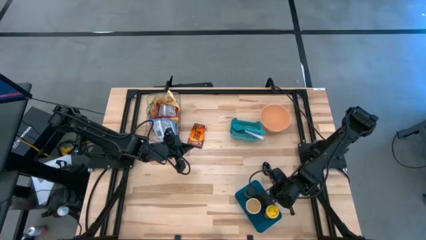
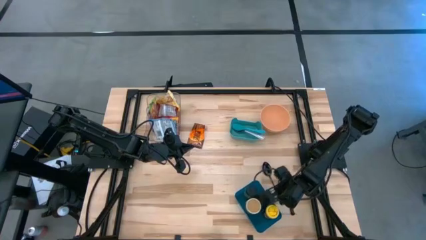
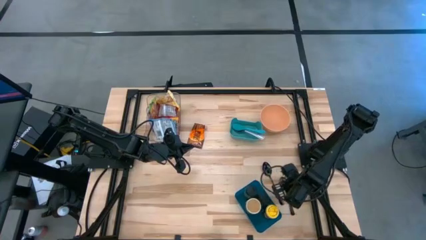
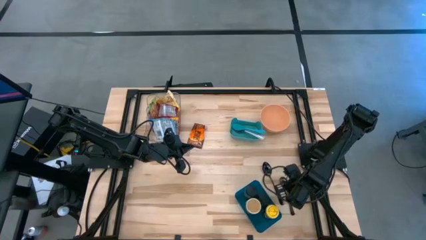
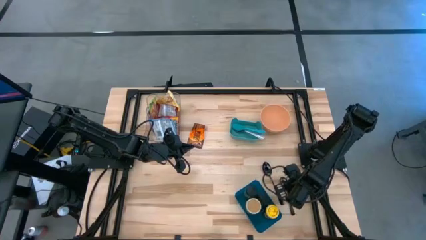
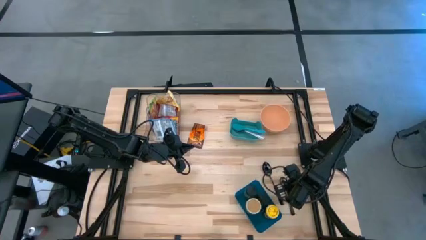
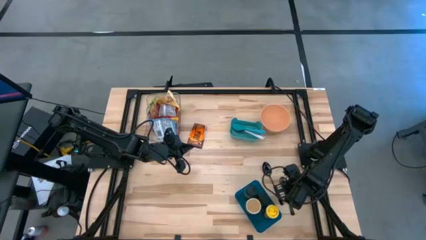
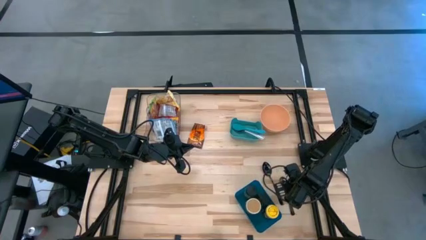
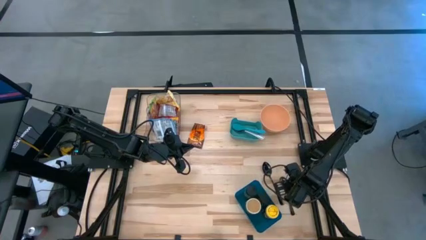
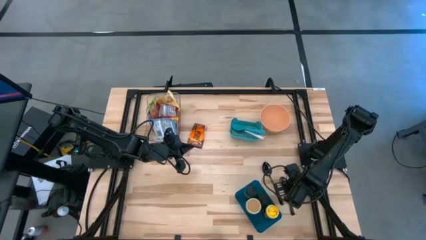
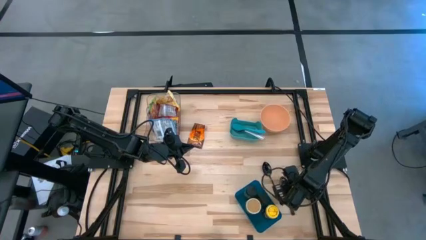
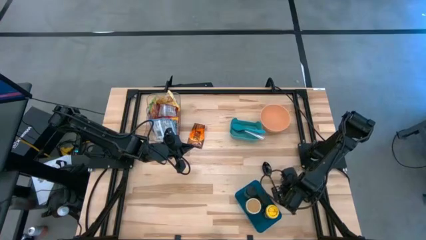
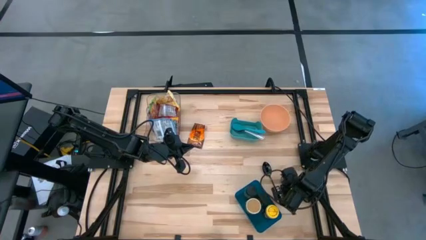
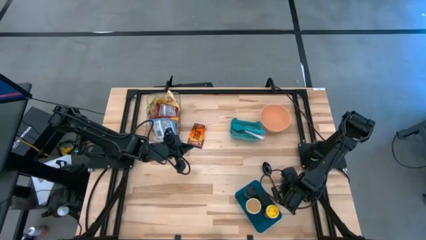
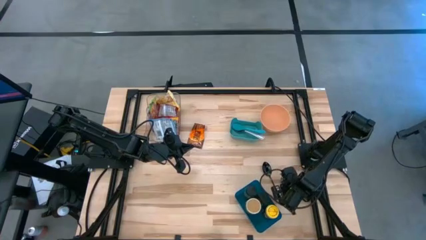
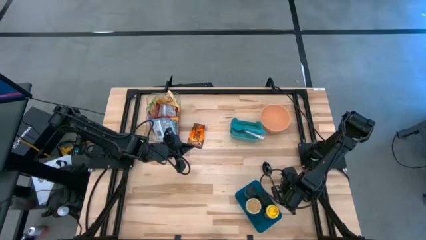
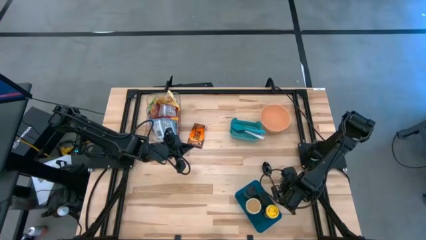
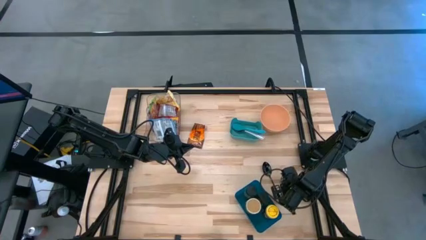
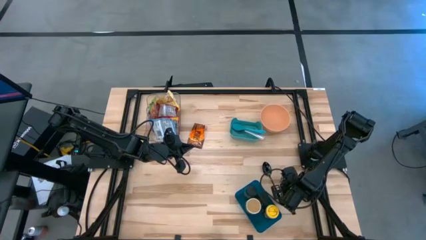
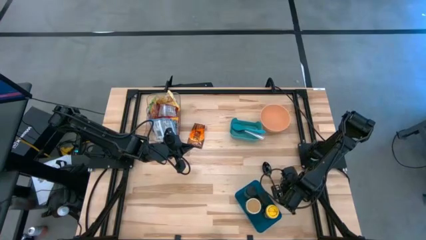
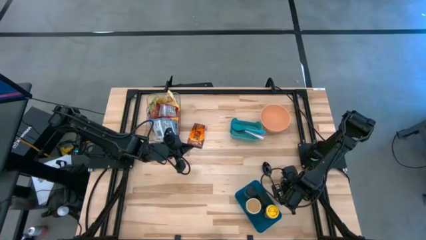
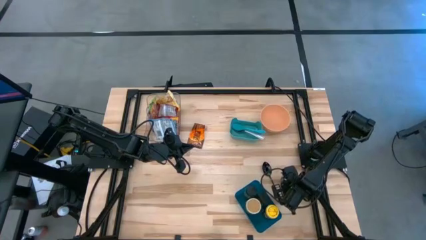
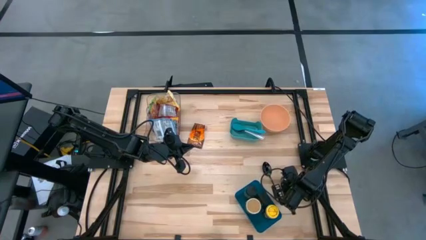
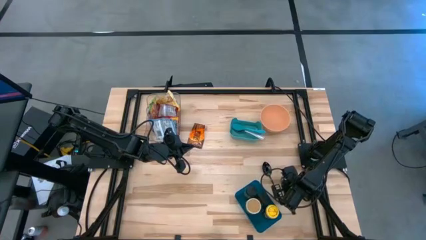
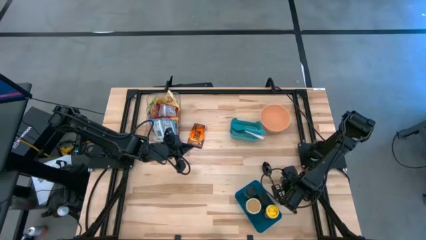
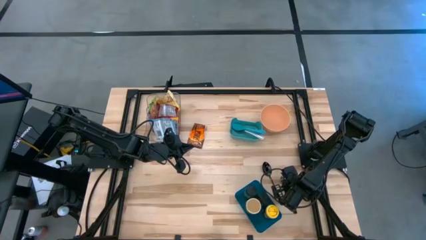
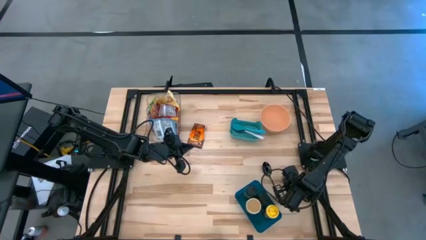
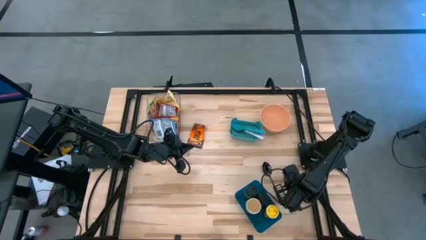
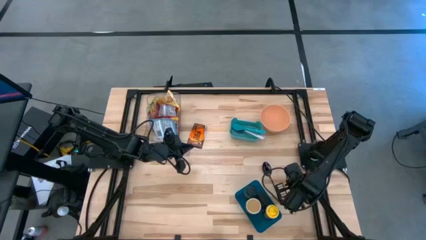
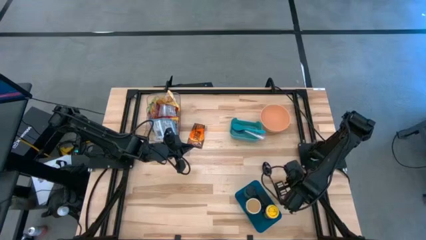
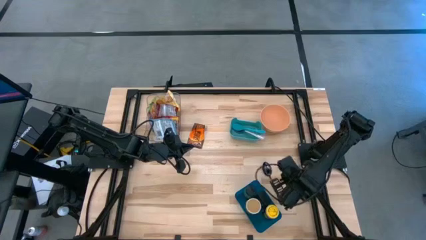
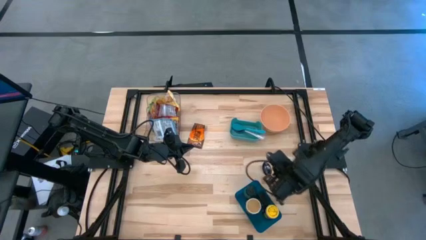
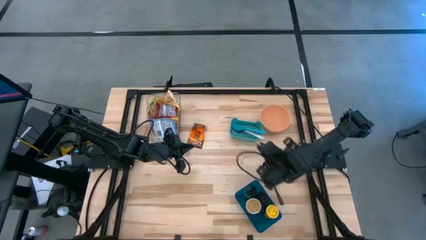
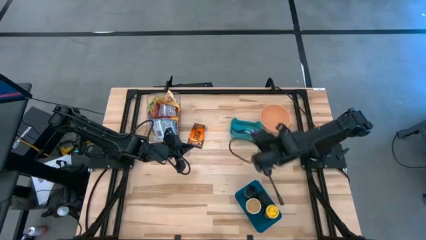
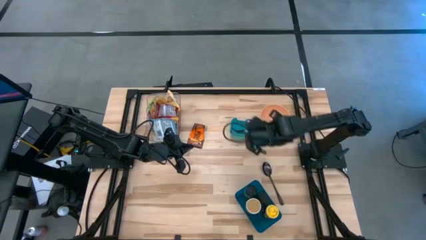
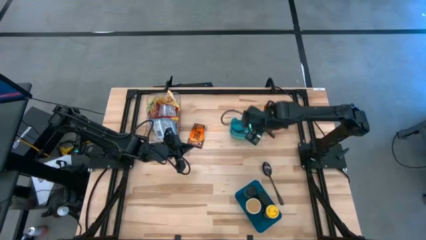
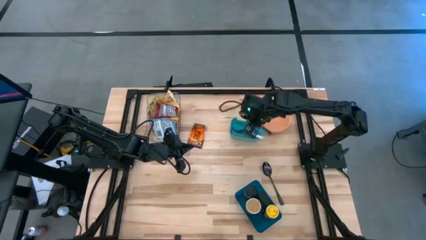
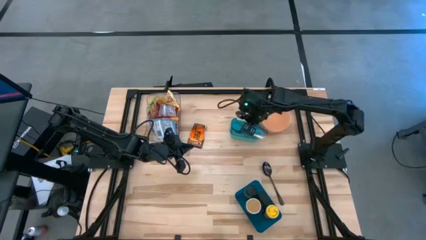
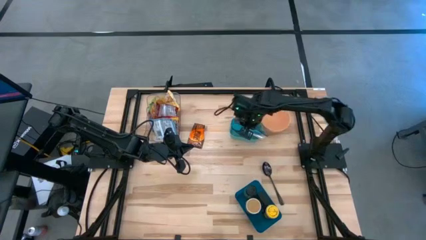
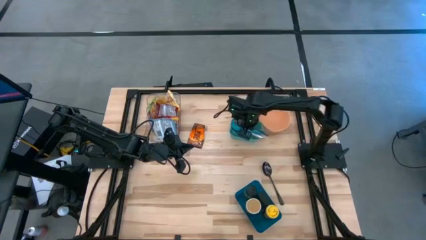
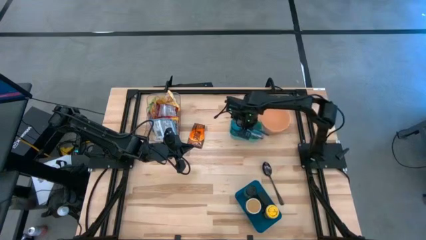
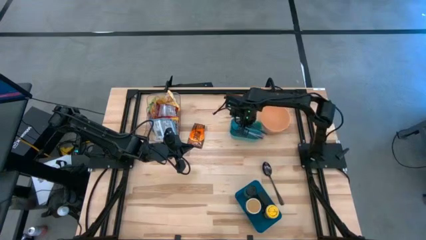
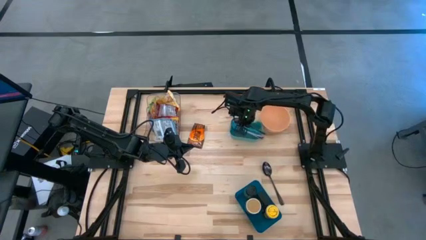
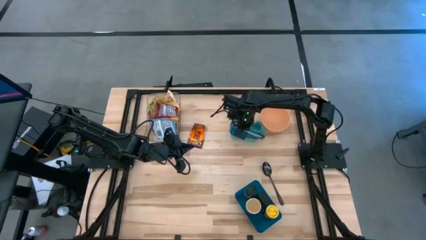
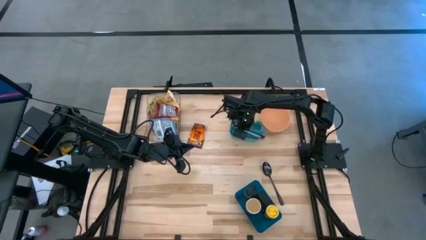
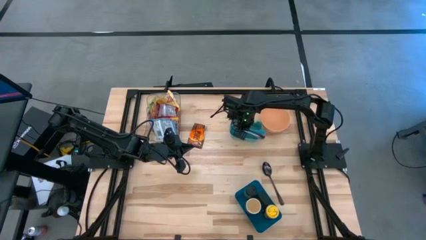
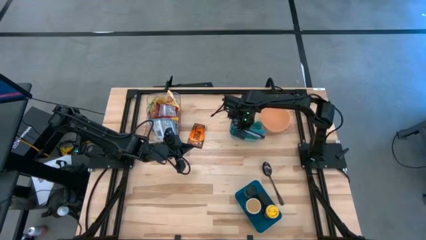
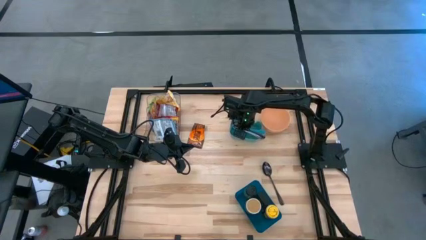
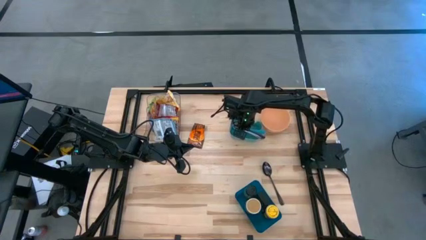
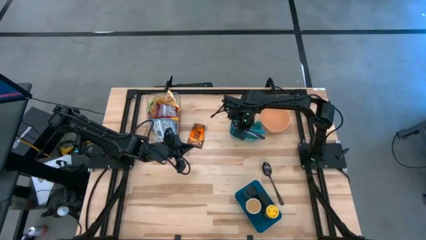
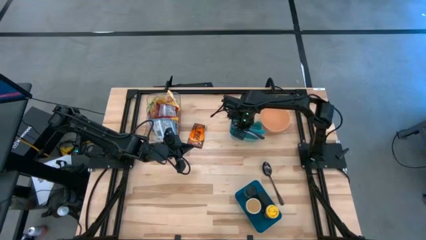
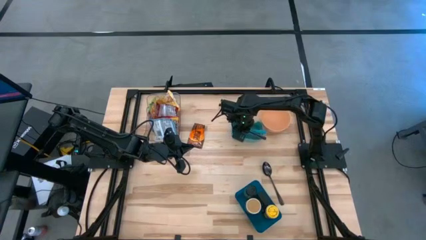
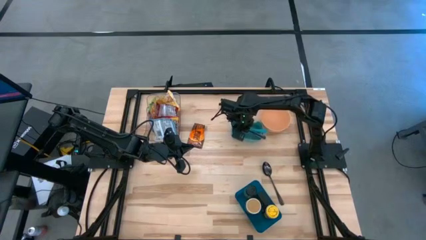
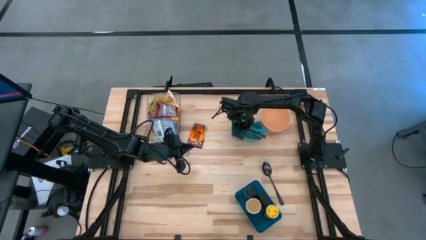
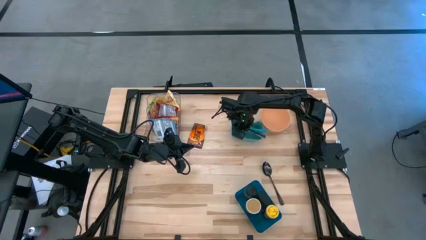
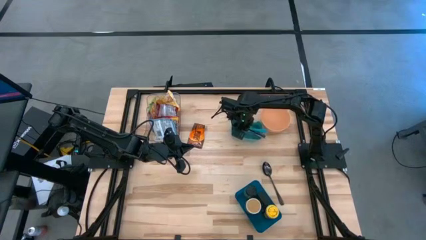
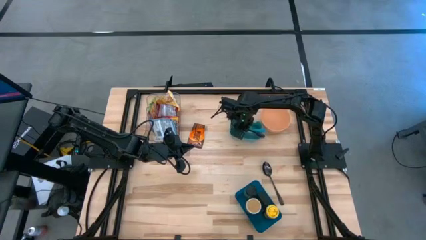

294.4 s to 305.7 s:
Task: Pick & Place Food Item
Put the right black spoon into the green bin

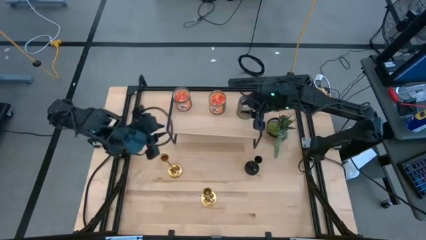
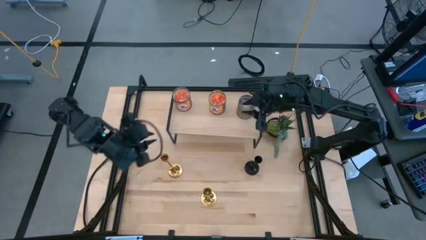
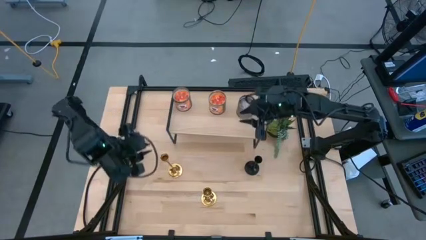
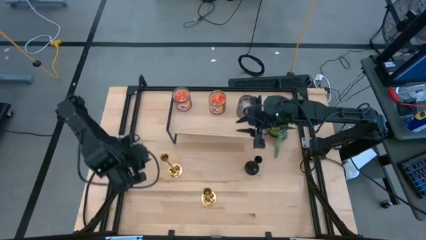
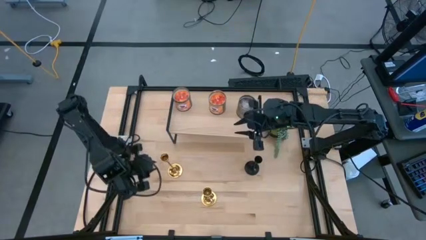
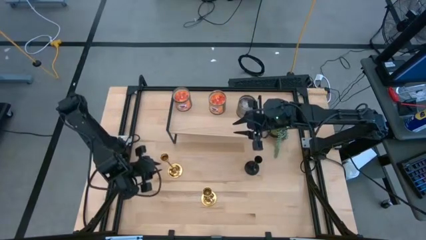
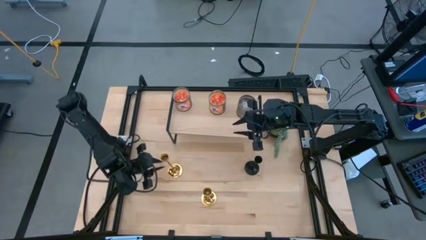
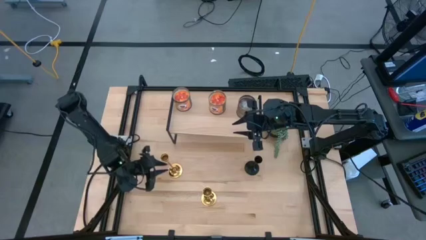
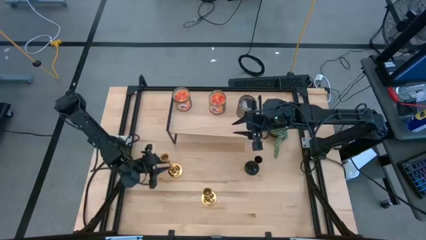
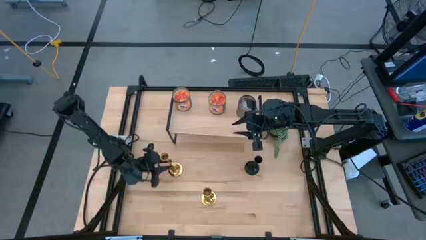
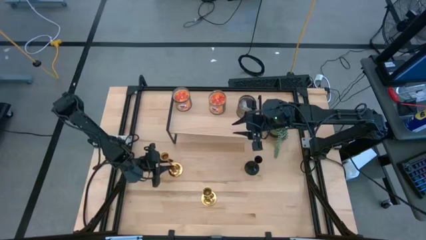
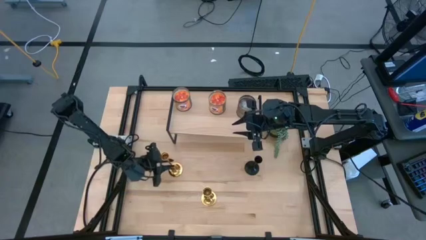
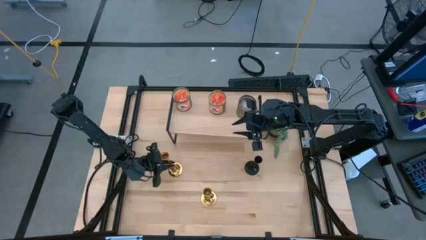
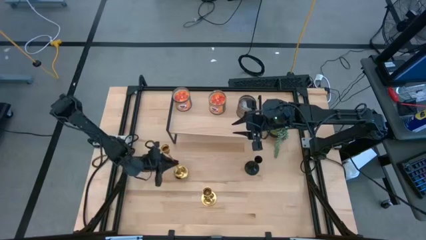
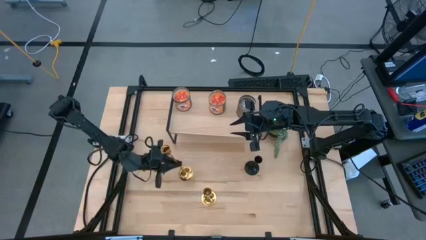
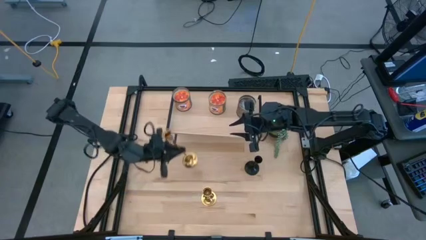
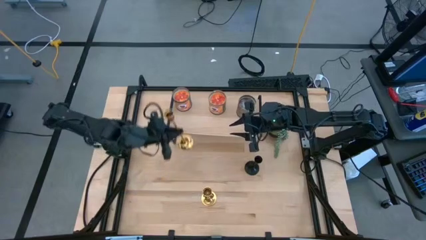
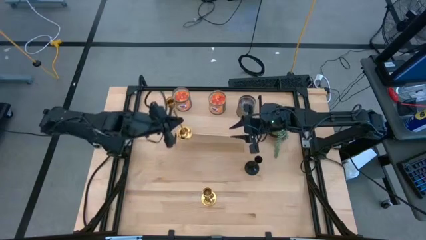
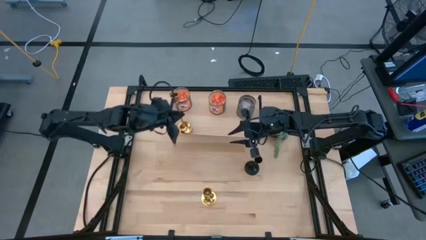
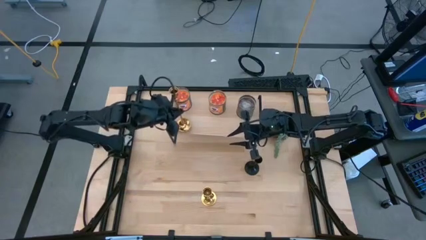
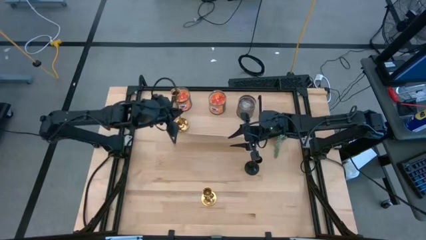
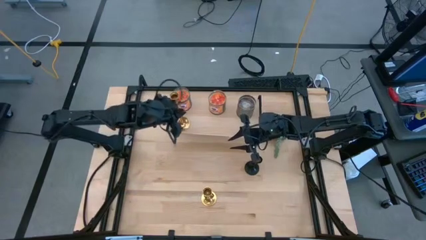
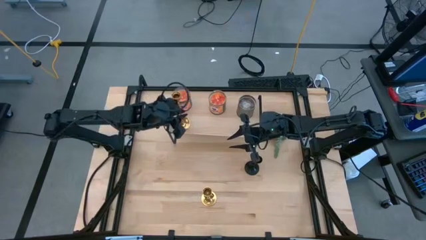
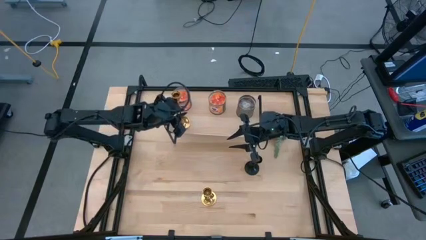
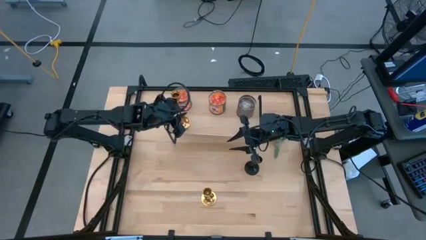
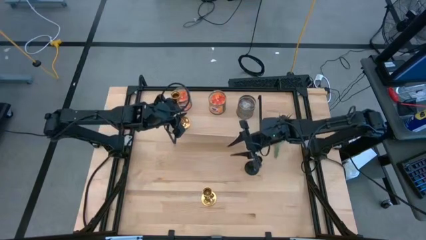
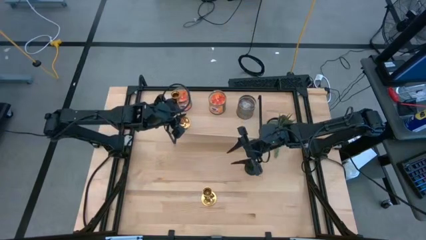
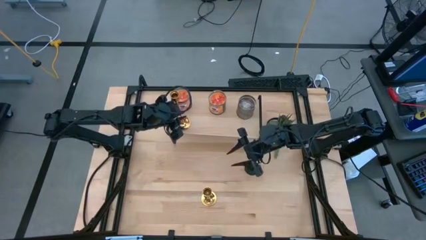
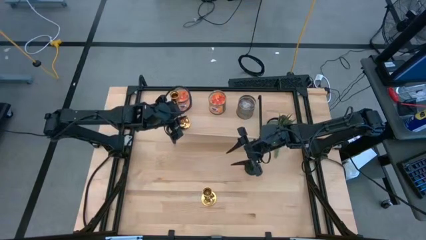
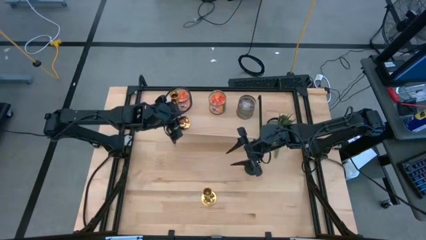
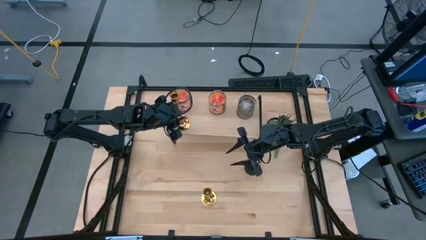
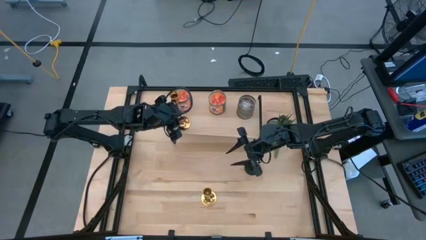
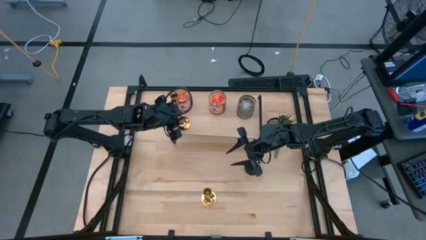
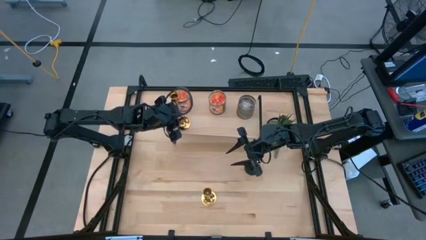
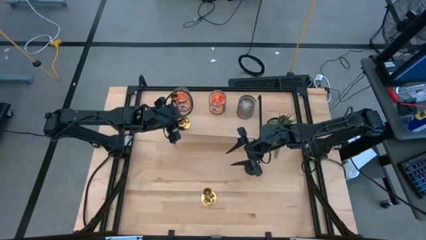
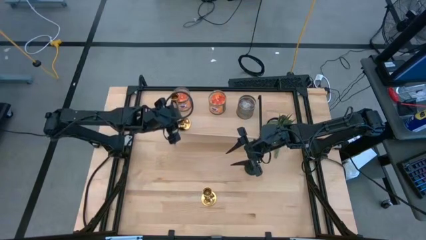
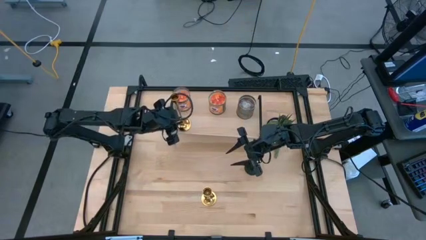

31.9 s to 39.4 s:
Task: Pick & Place candle stick holders
Put the top gold candle holder on the shelf
